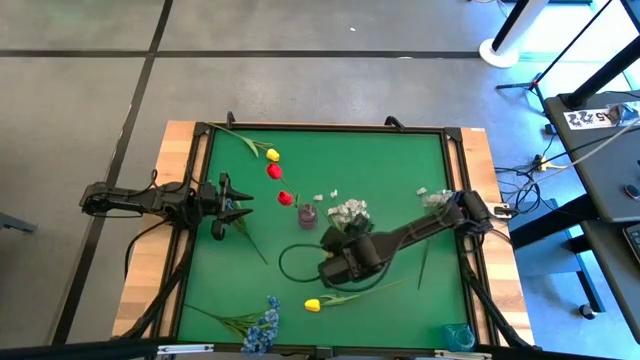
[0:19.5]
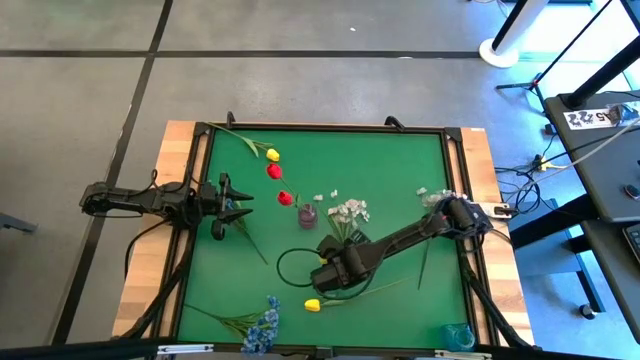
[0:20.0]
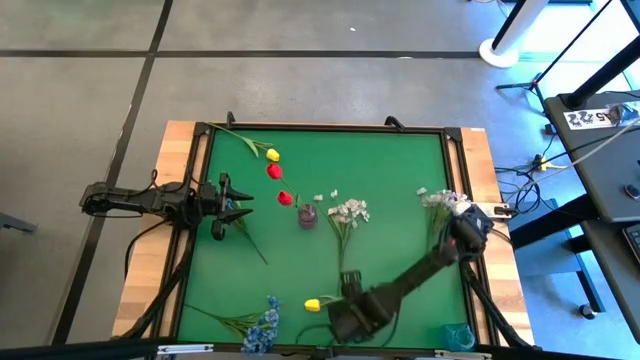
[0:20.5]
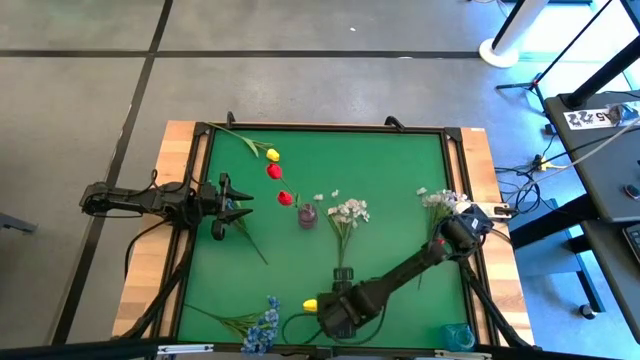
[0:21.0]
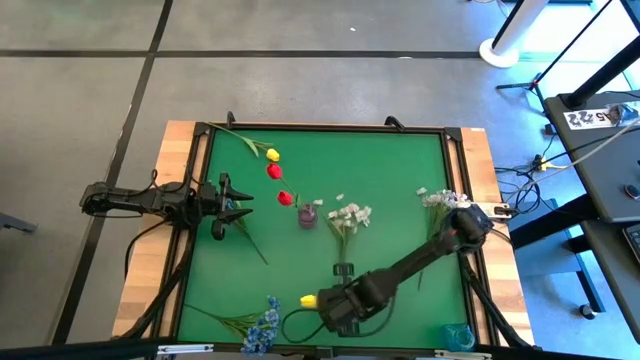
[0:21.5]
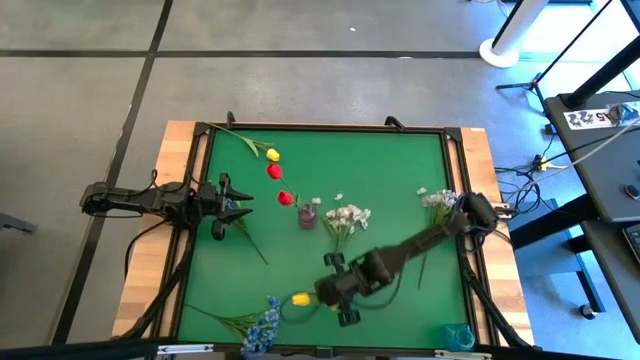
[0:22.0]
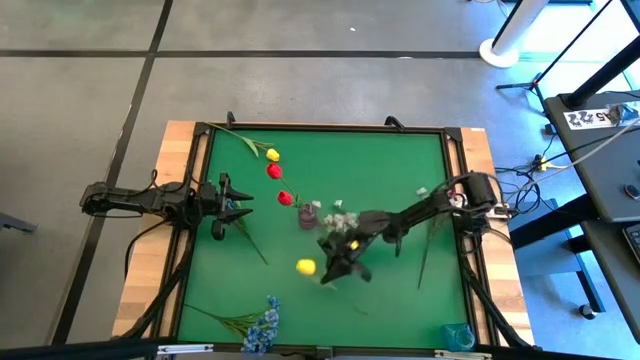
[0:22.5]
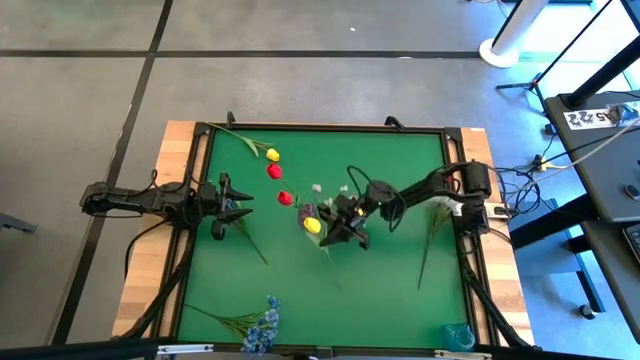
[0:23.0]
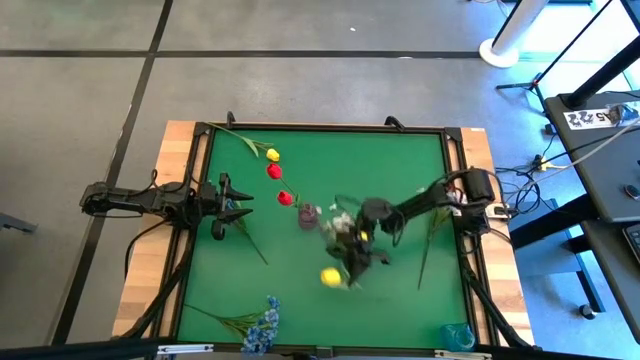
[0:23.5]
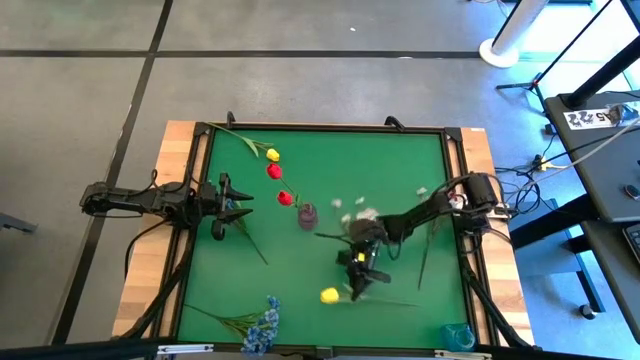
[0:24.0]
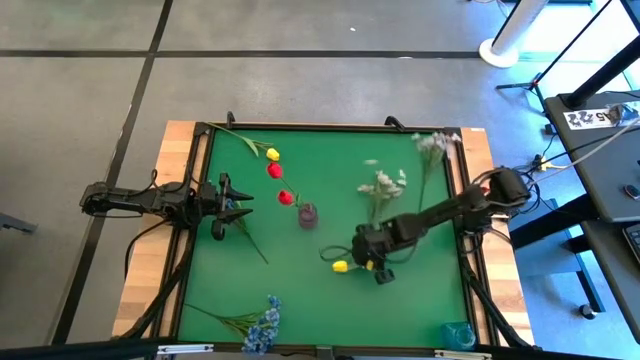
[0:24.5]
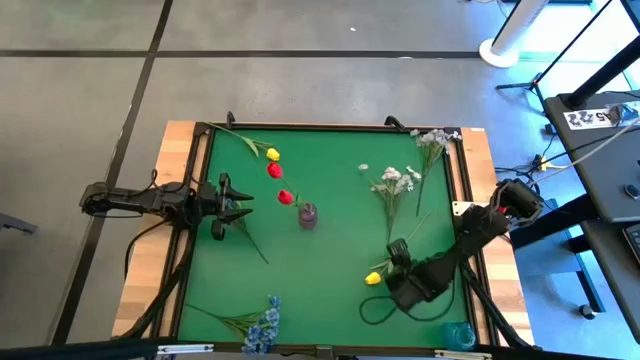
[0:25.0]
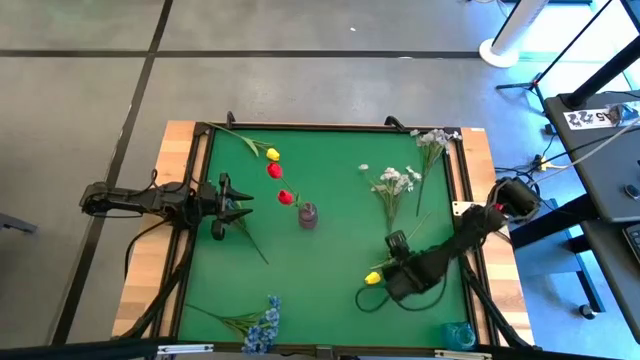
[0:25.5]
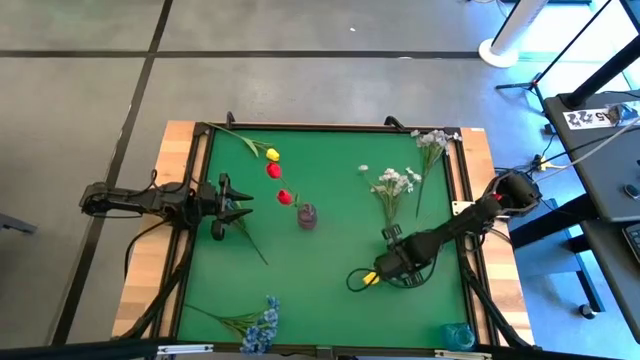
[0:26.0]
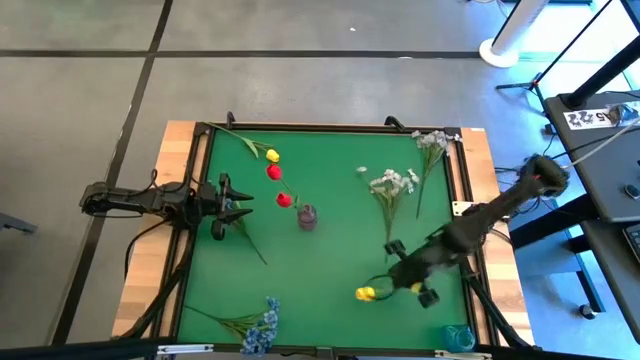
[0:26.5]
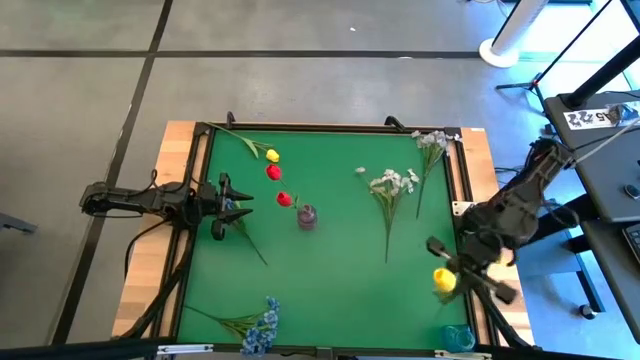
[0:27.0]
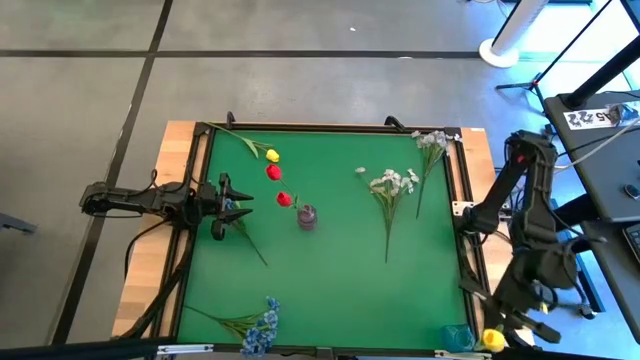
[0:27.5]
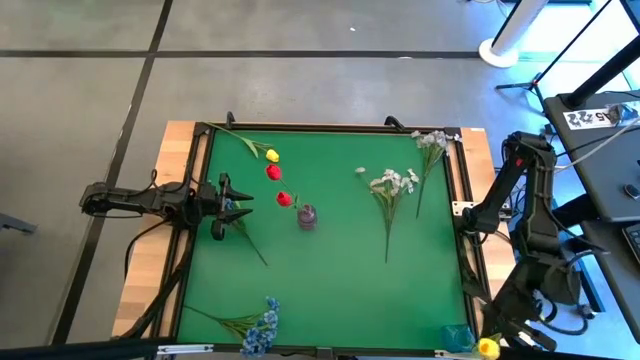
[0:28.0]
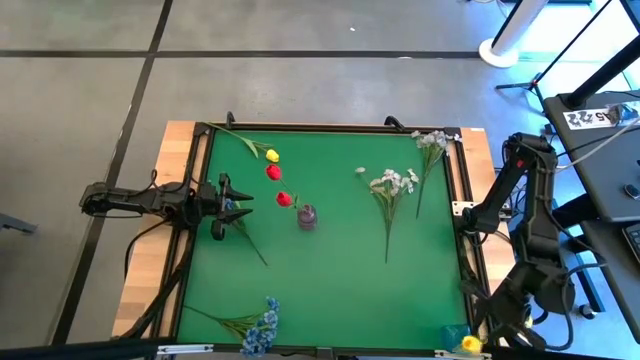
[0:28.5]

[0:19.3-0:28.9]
Task: Sort flowers into vase by color
Put the yellow tulip into the blue vase

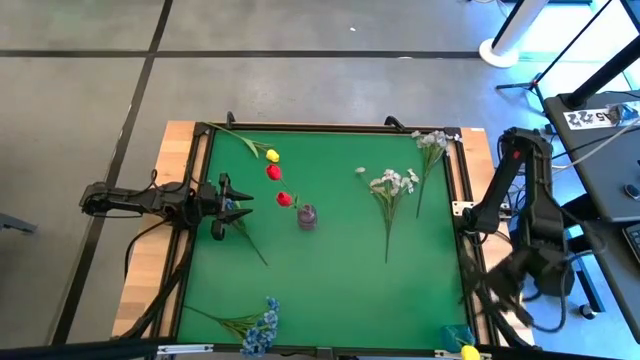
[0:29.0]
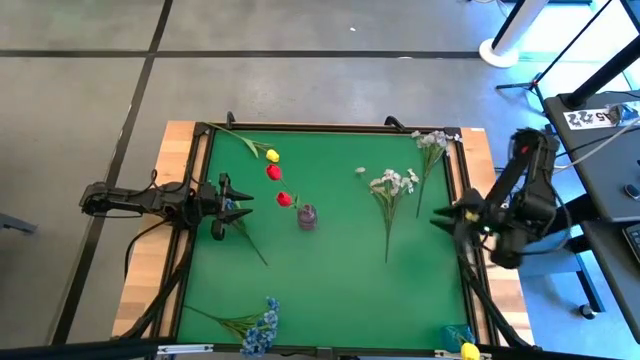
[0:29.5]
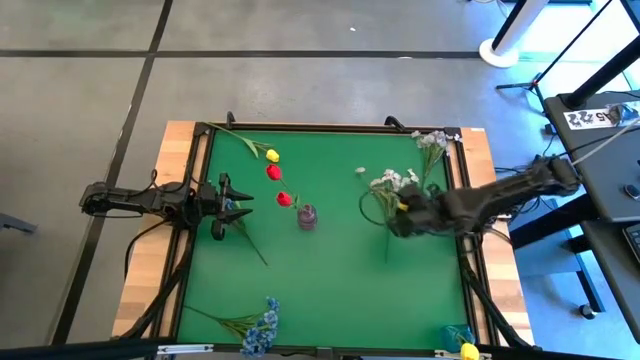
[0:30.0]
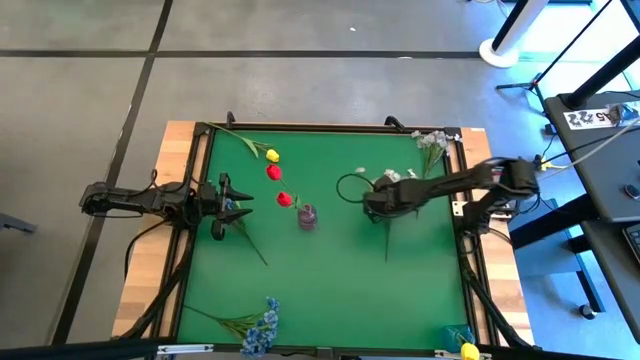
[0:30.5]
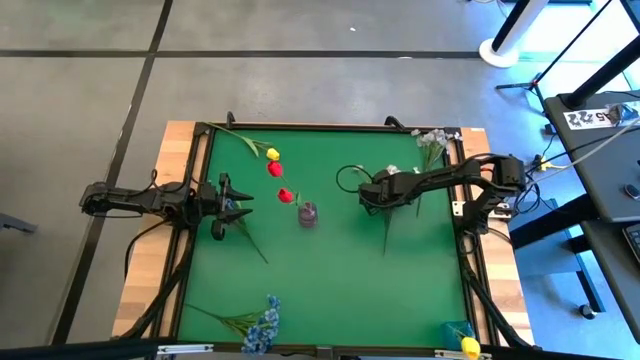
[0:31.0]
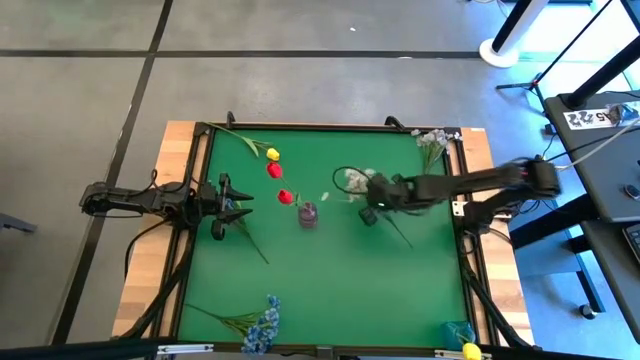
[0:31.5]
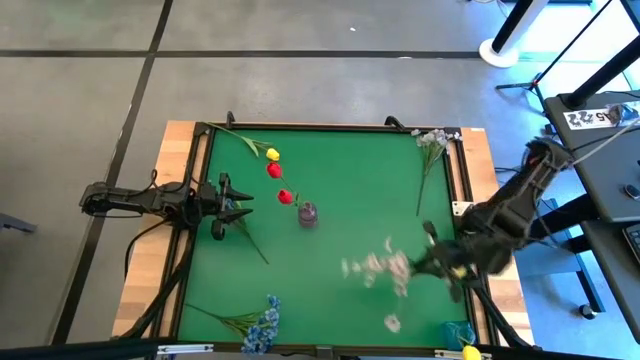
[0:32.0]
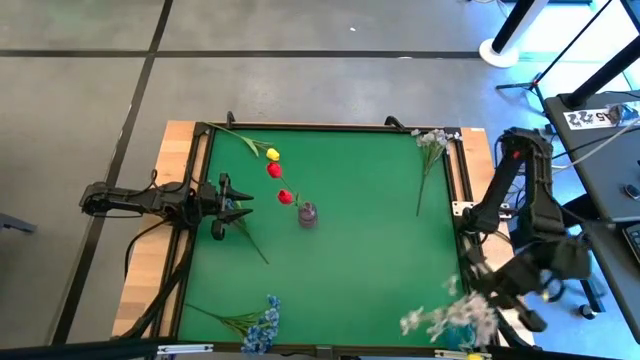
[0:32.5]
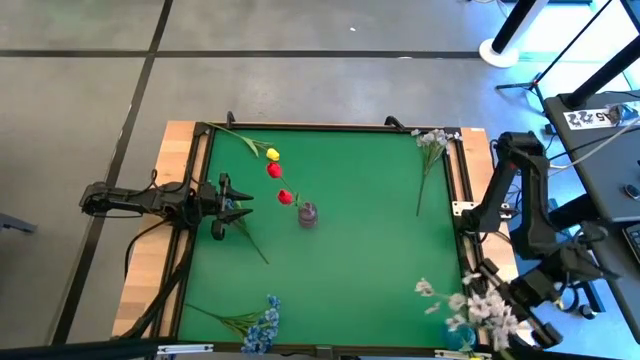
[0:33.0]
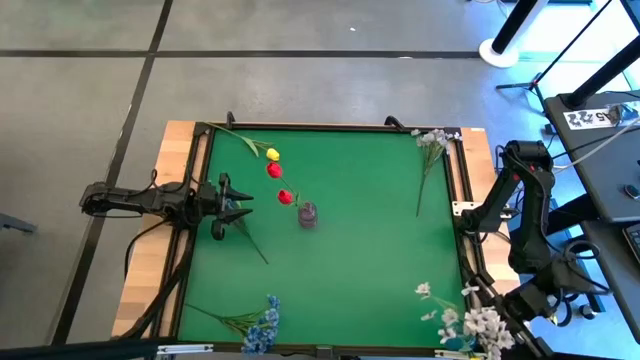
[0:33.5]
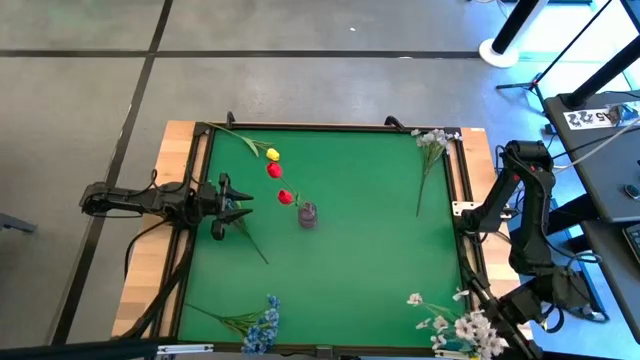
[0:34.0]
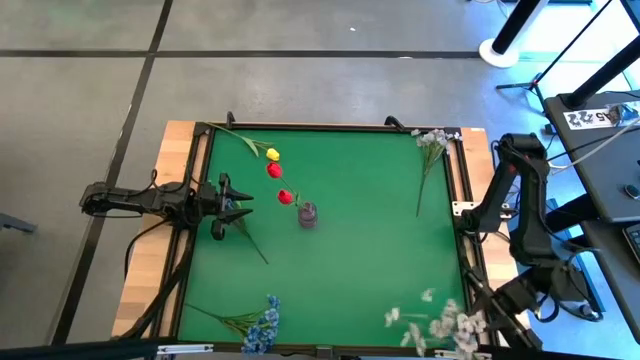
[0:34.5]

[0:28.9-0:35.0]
Put the white flowers into the blue vase

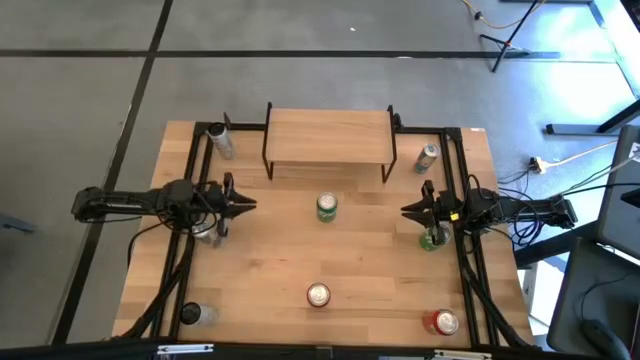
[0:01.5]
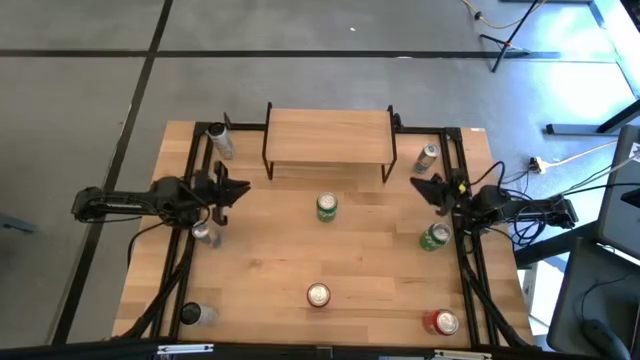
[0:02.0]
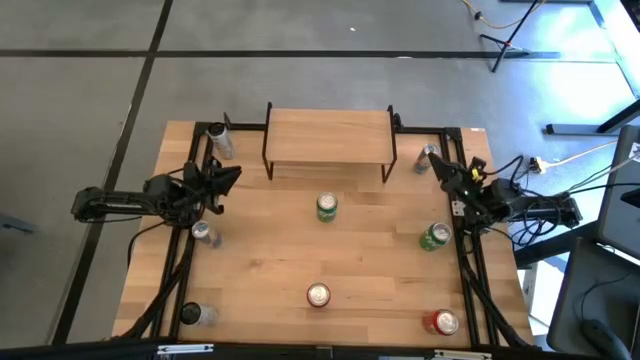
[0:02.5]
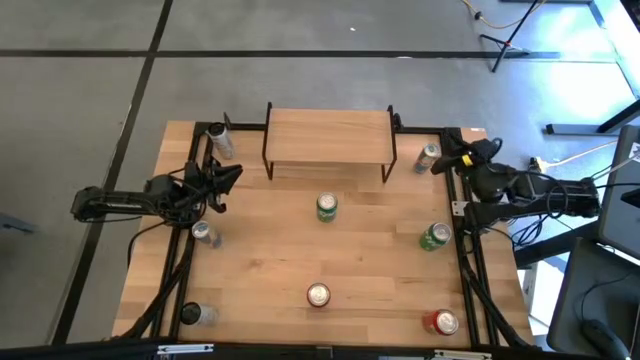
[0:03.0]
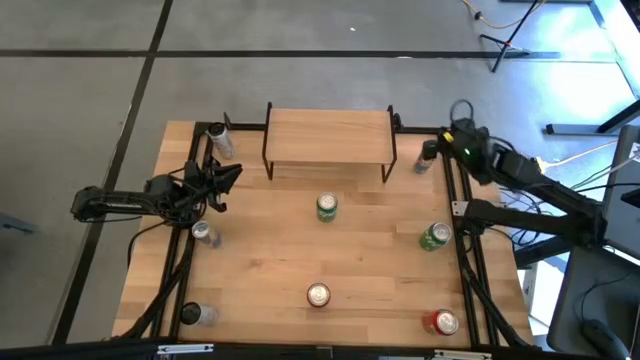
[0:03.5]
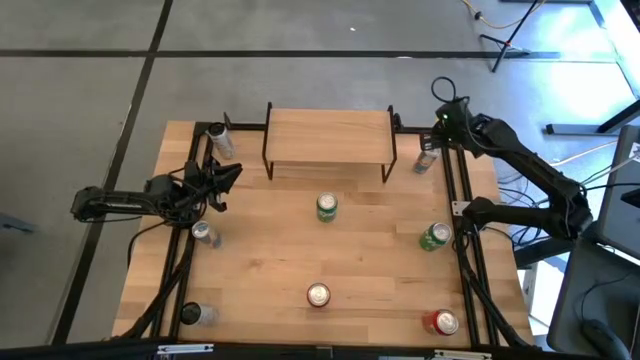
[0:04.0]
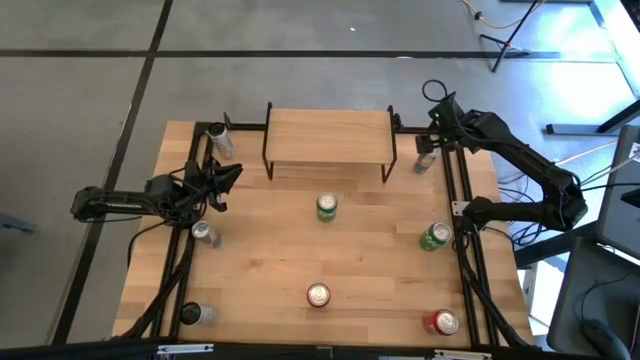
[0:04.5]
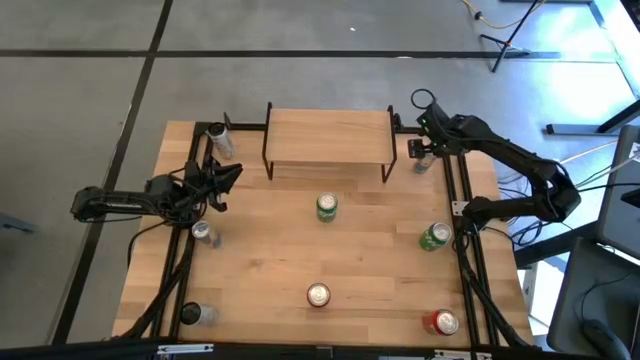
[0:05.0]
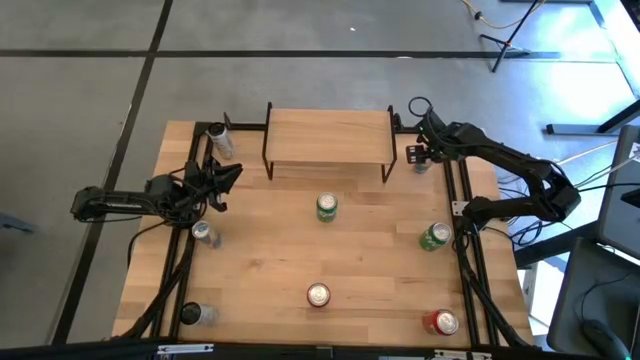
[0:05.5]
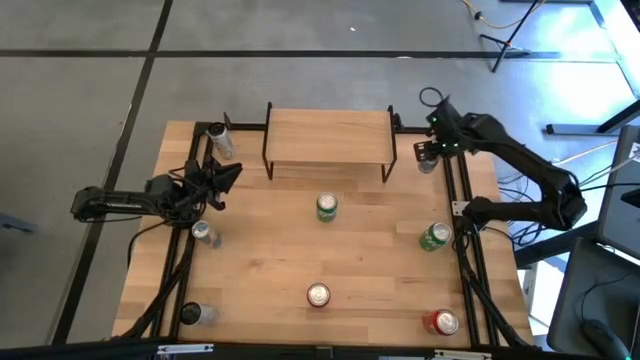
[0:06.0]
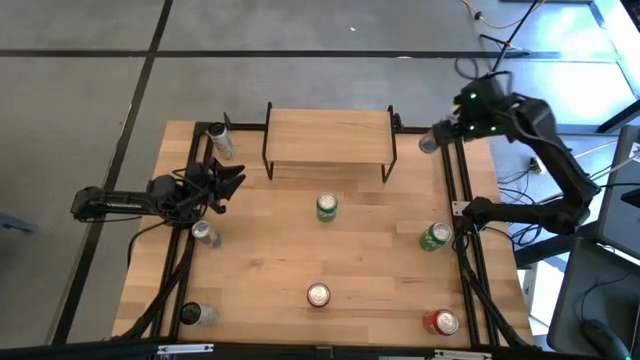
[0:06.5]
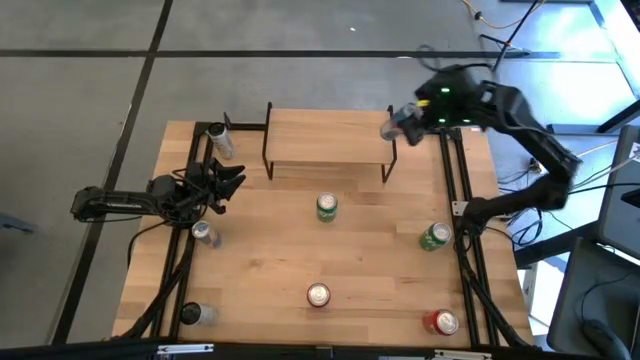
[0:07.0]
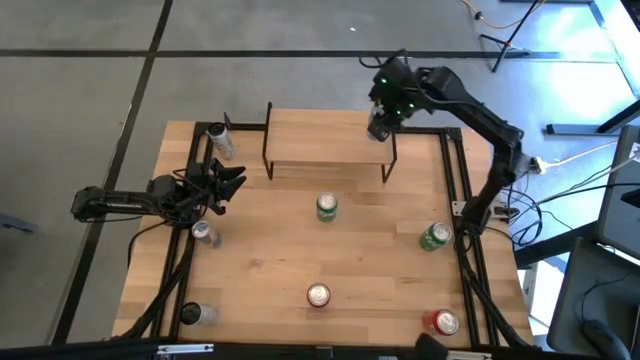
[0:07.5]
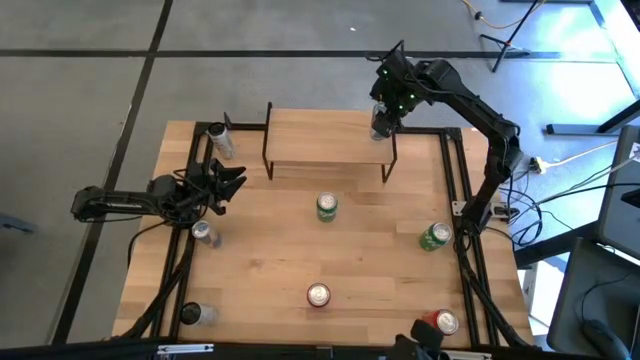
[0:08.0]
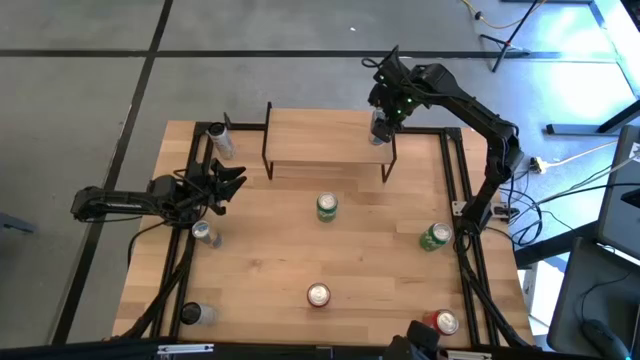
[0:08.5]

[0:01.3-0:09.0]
Task: Place canned beverage on shelf
Put the top blue soda can on the shelf
